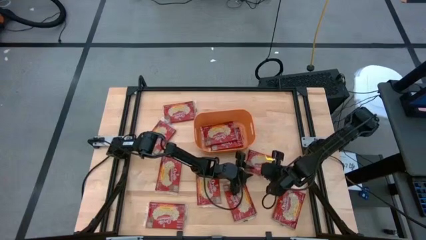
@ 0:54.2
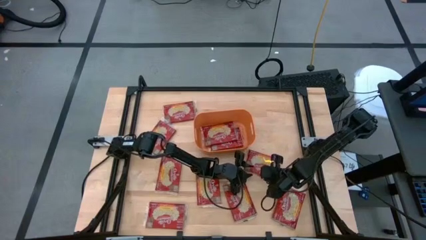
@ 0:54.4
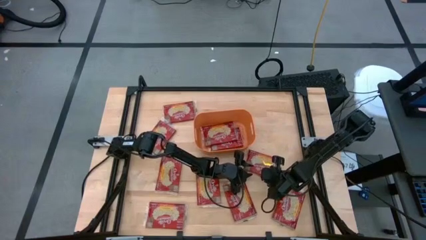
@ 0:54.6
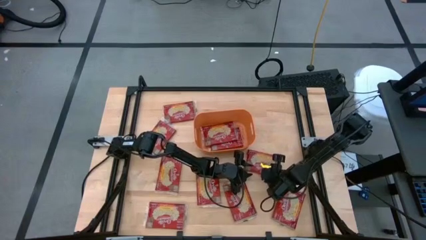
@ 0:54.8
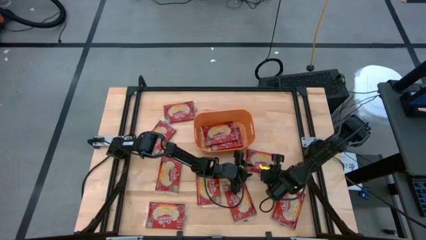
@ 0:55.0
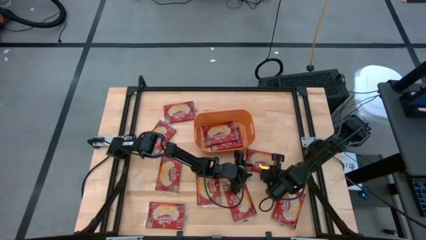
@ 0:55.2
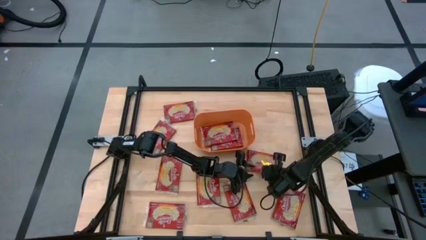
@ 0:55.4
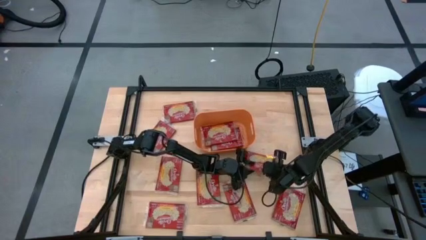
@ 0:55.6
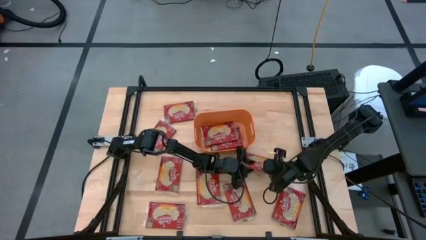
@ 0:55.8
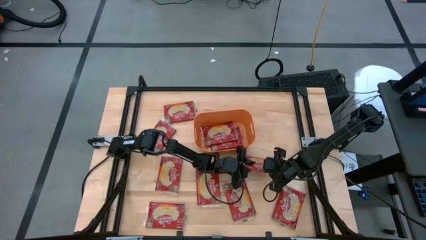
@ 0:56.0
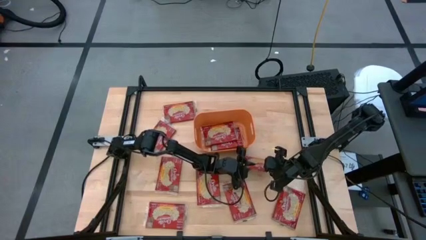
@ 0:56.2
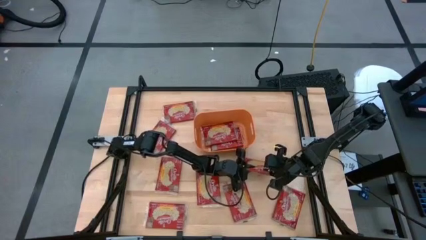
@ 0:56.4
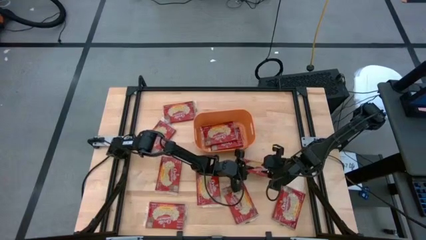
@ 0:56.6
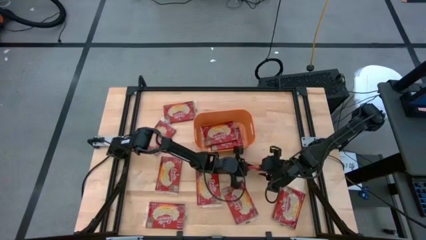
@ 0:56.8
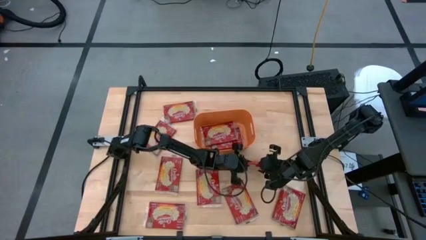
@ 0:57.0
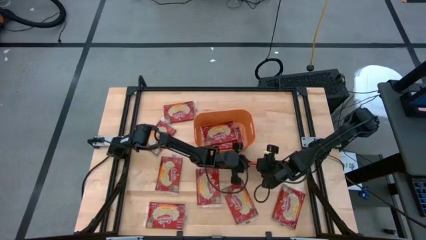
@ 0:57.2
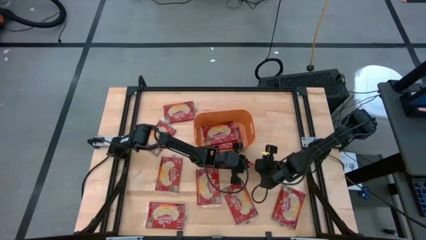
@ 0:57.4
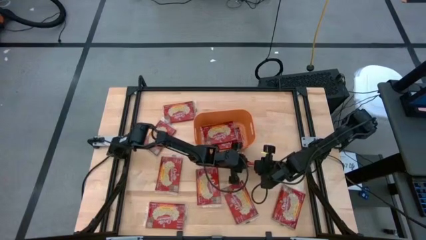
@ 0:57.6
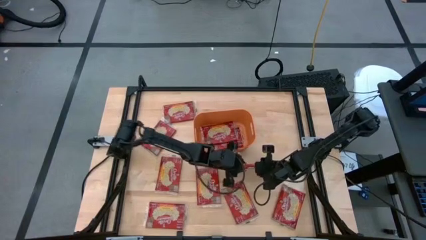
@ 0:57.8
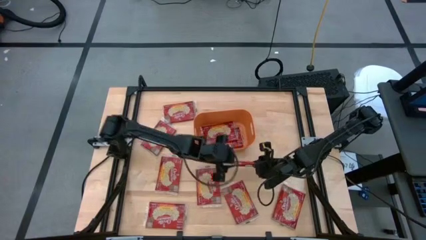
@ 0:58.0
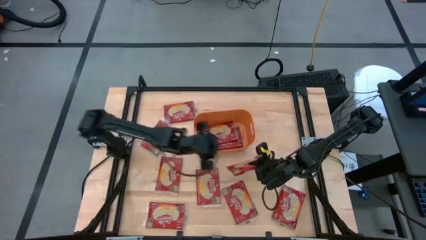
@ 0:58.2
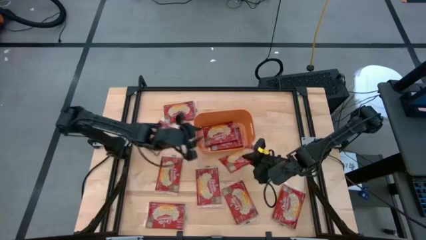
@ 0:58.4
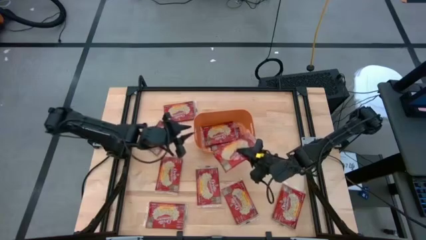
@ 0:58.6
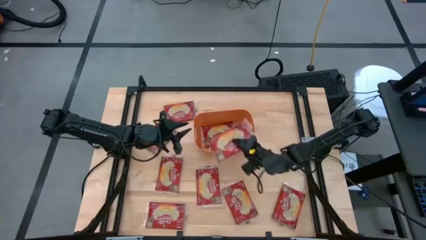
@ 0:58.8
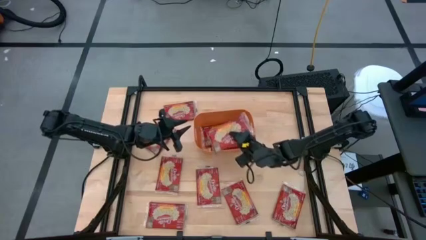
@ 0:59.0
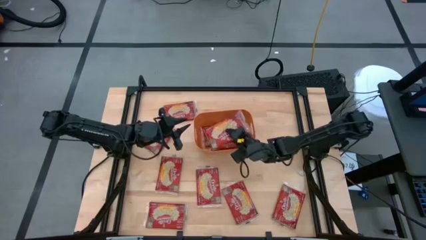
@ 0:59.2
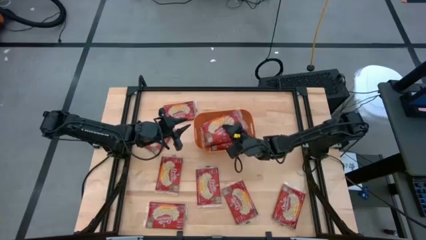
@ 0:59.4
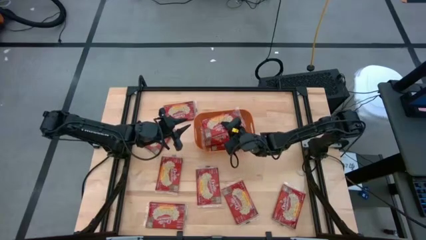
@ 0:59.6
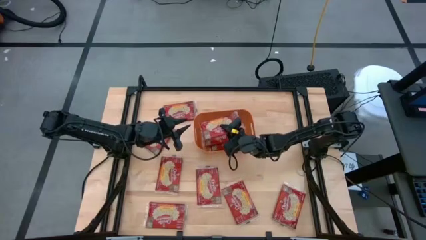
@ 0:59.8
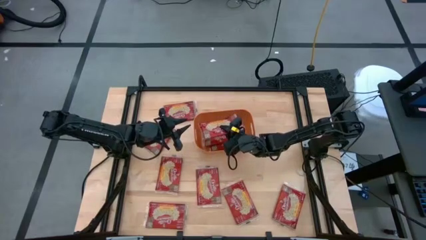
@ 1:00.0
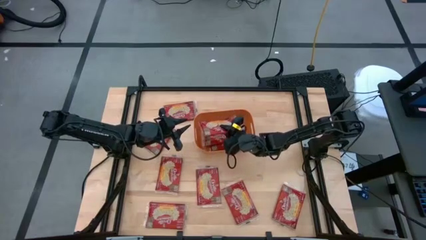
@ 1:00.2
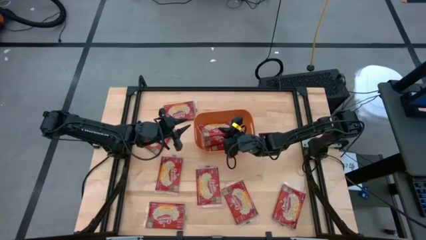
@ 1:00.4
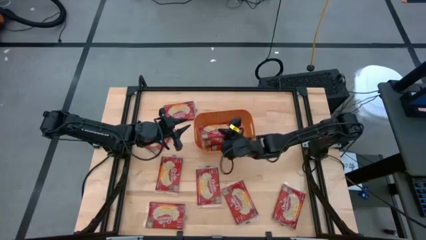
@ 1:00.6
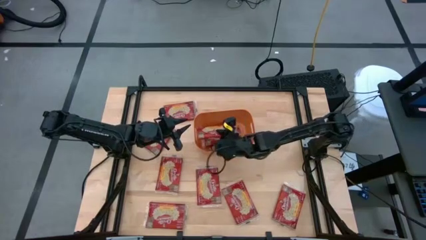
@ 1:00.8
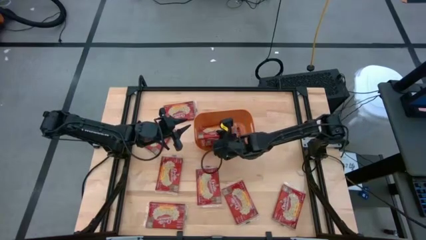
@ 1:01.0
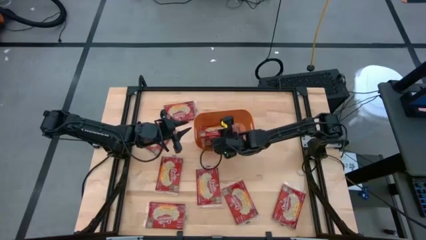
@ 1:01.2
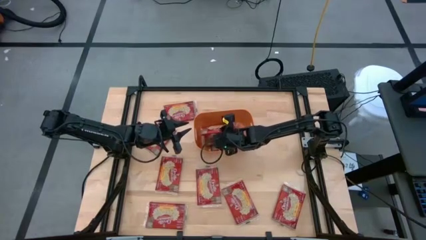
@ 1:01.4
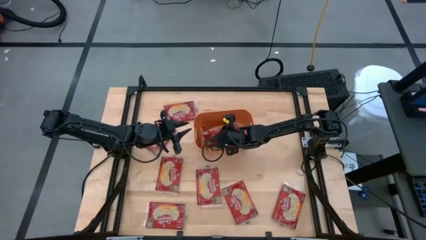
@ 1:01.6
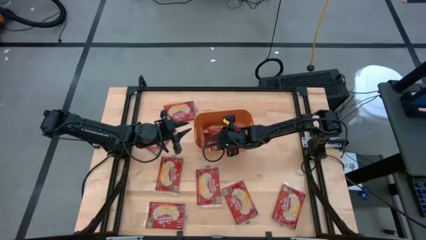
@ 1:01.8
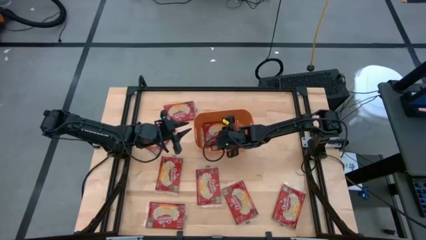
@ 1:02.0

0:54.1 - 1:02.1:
Task: Sort popcorn bags into baskets
Put the red popcorn bag into the orange bin

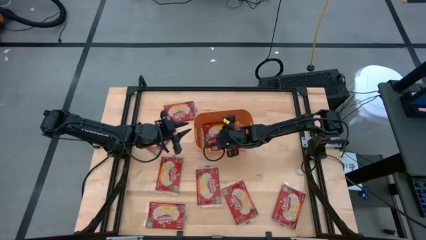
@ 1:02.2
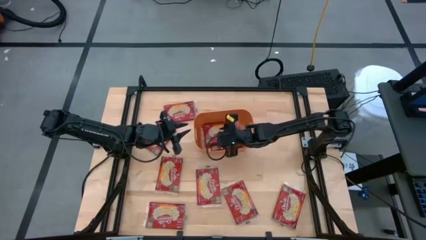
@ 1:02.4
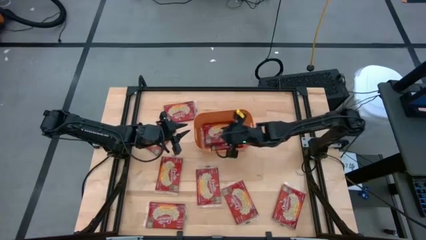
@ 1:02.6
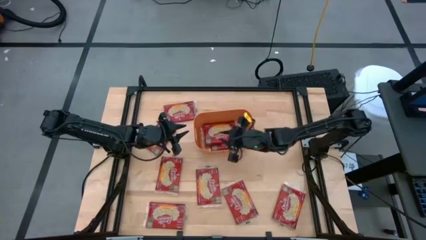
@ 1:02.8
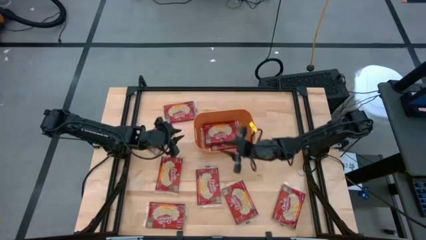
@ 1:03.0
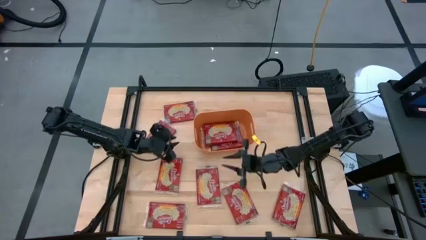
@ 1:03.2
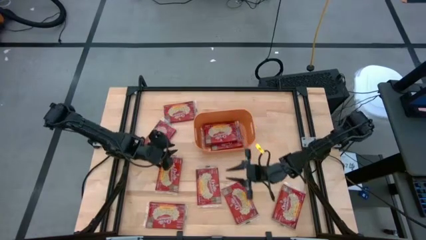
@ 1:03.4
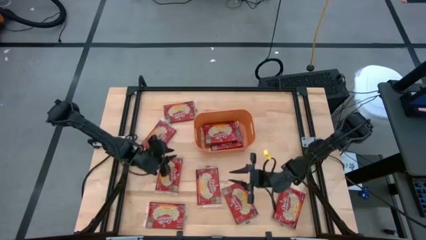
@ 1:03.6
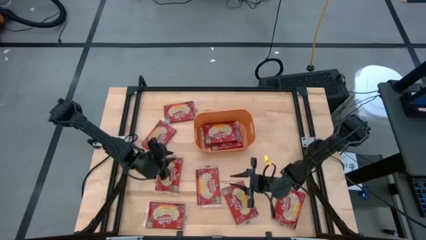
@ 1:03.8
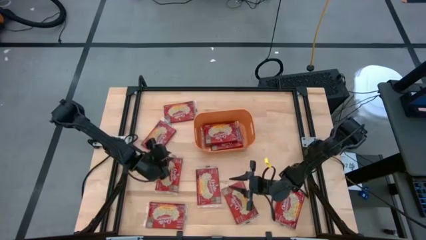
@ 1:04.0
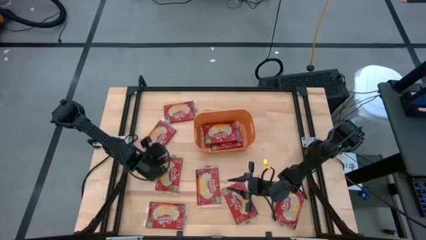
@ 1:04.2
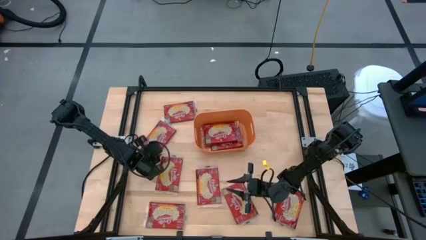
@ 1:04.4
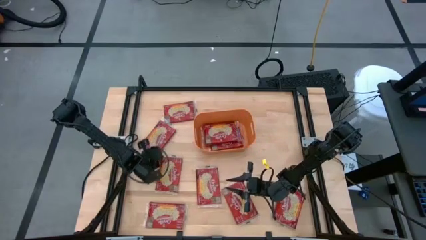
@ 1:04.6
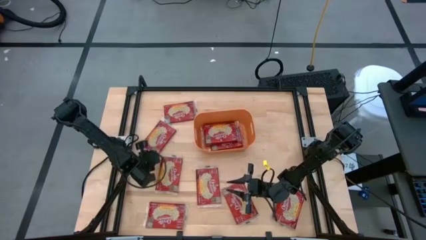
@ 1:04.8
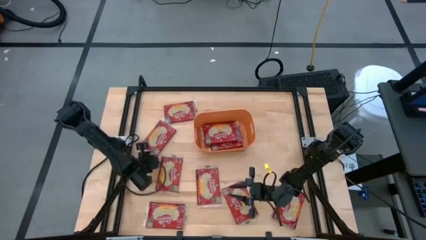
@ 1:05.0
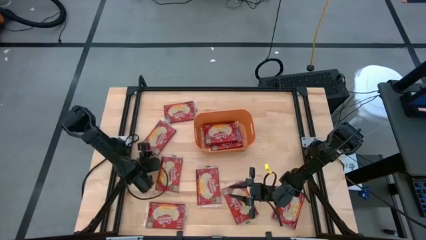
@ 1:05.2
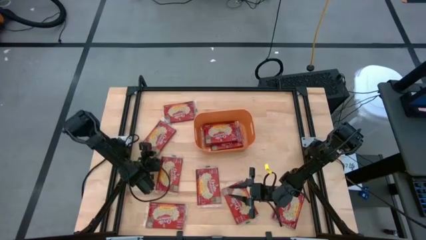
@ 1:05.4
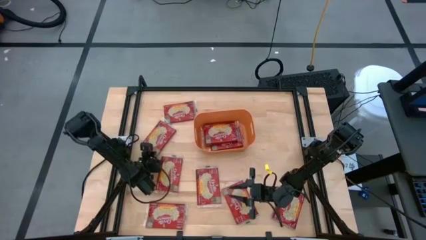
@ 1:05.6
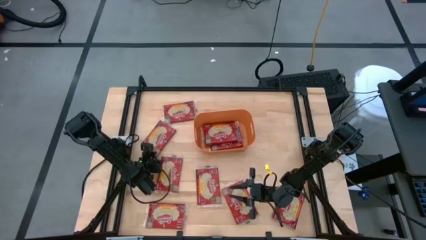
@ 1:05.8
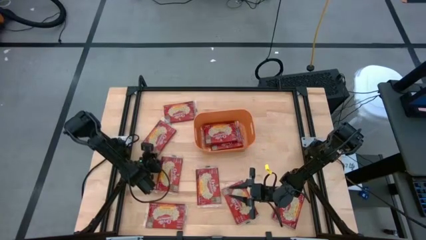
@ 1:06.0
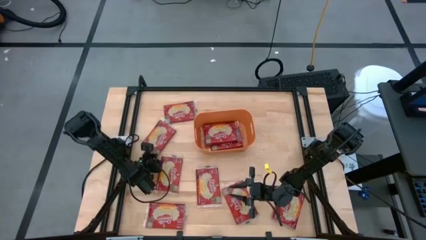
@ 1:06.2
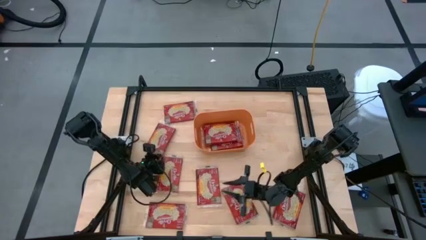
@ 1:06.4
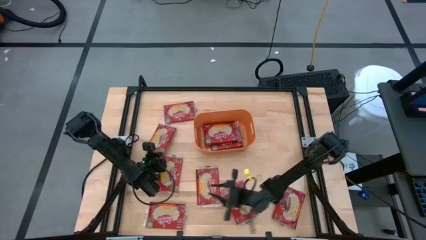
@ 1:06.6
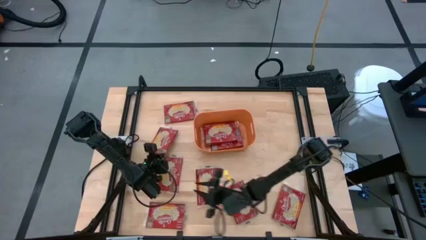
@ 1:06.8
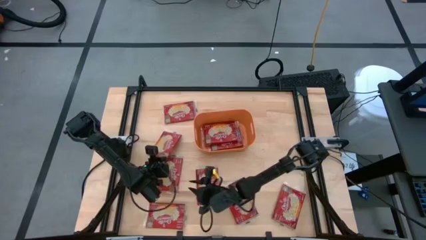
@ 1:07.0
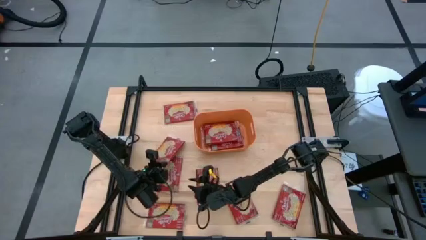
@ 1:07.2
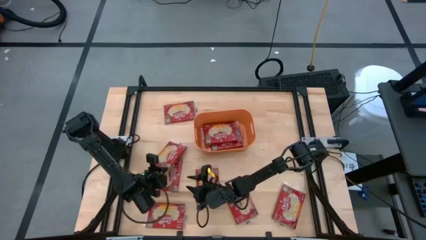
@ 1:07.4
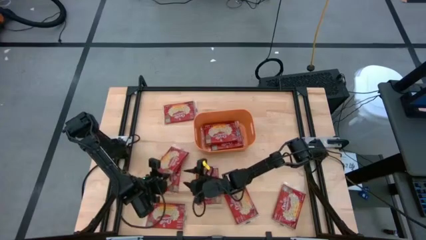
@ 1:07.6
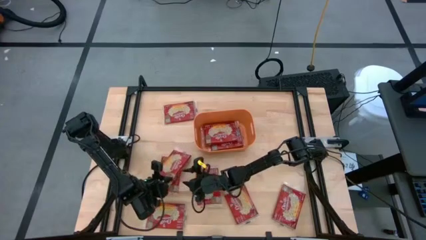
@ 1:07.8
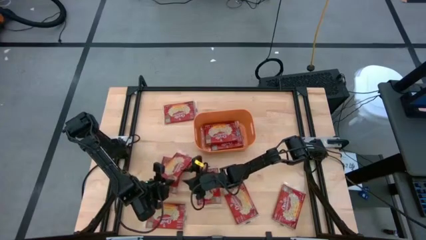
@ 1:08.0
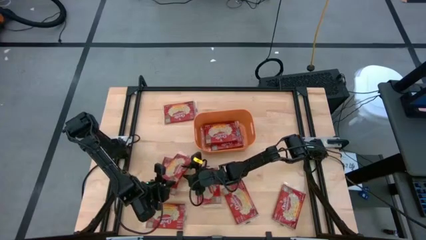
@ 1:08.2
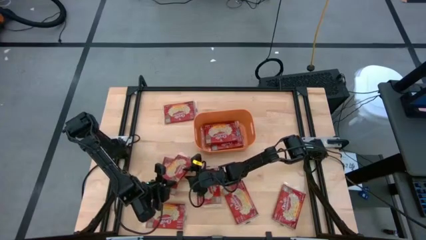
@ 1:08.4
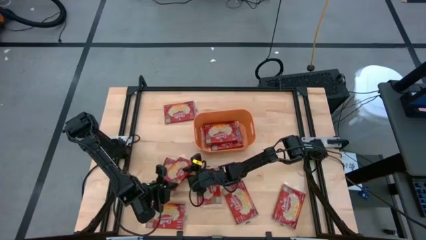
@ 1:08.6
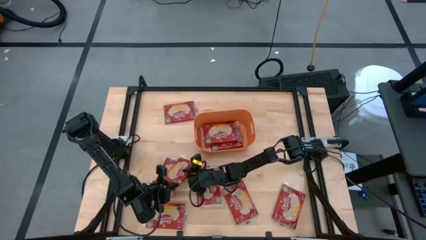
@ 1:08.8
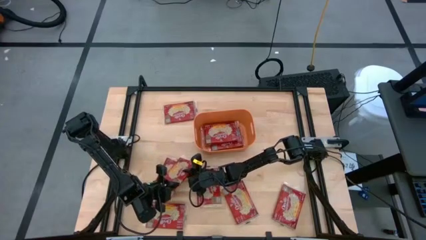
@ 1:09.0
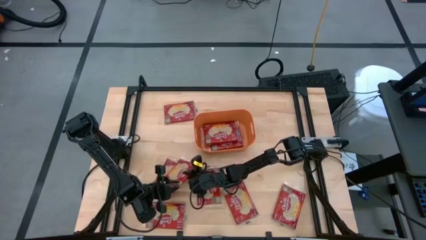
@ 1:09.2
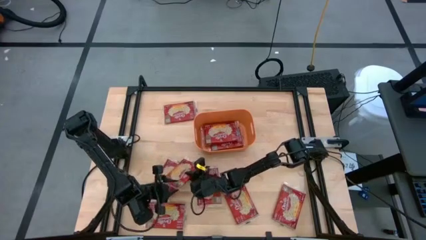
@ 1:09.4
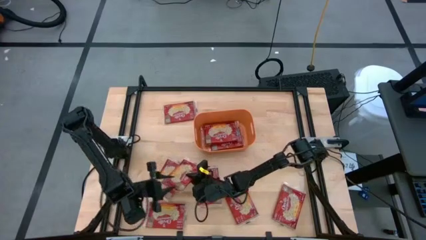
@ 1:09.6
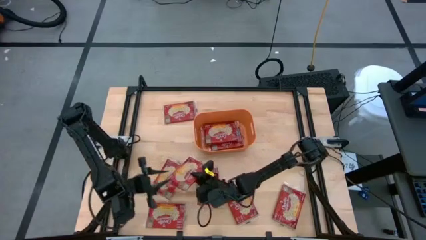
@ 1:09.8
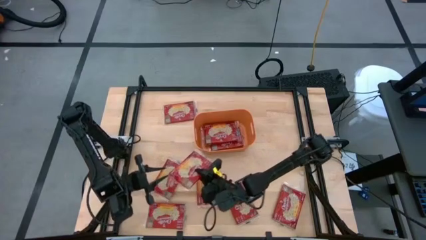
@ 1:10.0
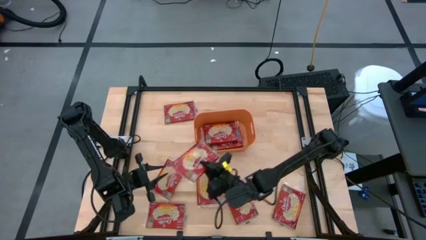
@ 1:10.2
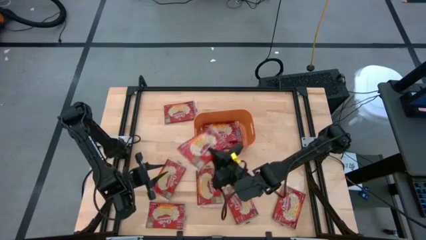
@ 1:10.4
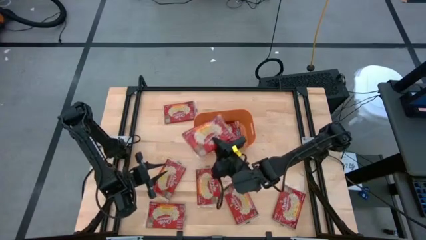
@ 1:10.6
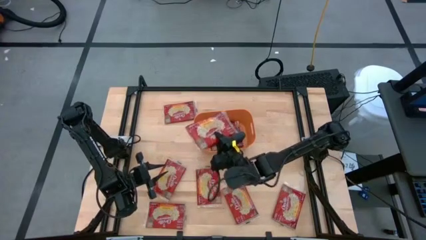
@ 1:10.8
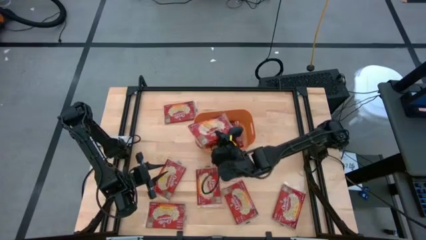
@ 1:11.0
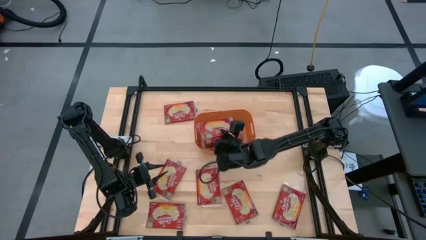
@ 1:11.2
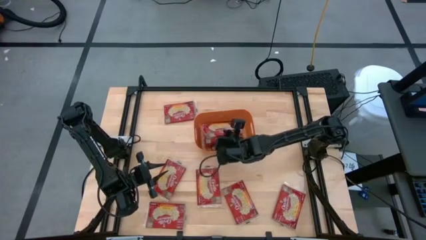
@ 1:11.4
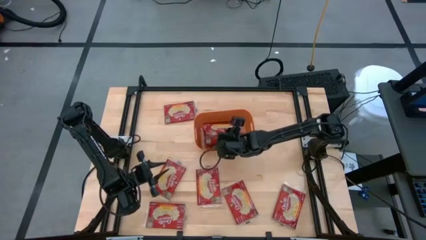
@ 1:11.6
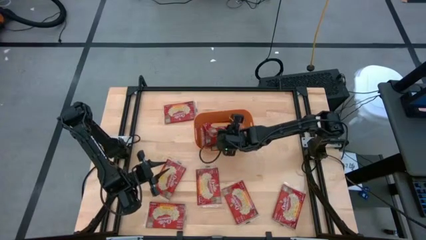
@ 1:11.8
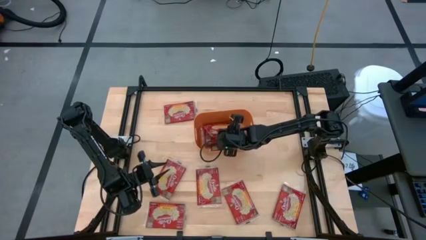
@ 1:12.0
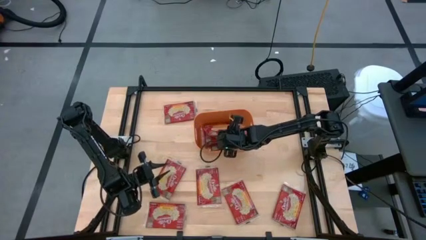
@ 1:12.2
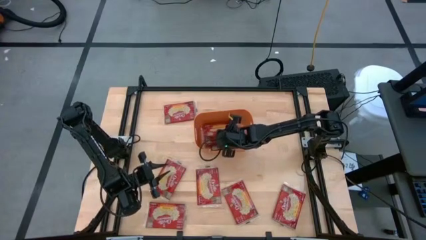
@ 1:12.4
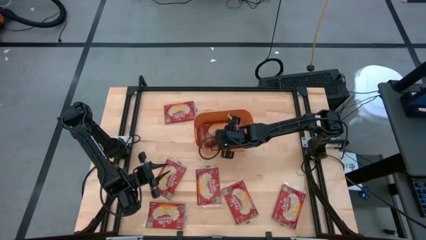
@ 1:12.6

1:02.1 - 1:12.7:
Put the red popcorn bag into the orange bin
